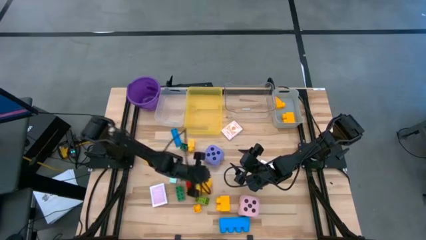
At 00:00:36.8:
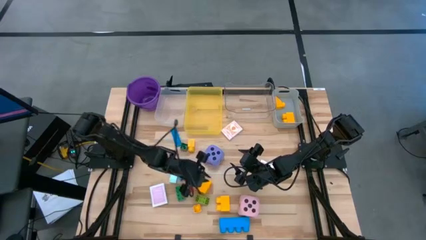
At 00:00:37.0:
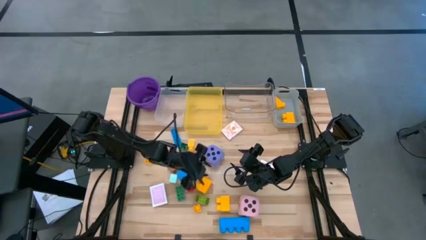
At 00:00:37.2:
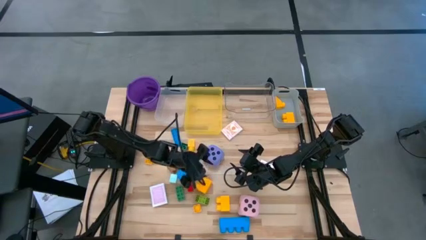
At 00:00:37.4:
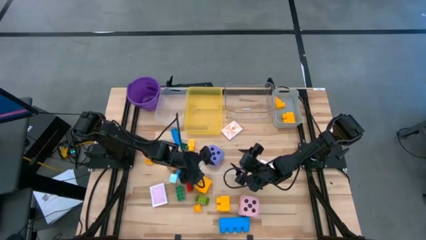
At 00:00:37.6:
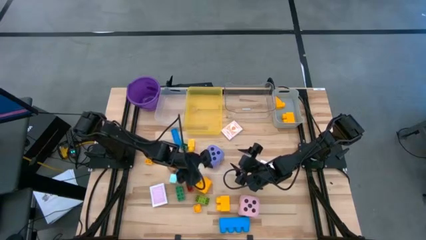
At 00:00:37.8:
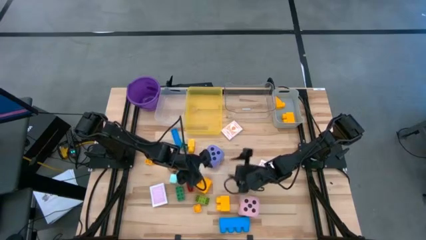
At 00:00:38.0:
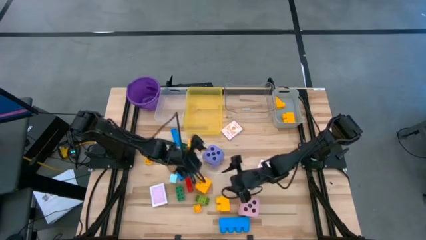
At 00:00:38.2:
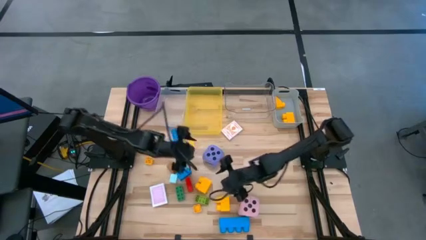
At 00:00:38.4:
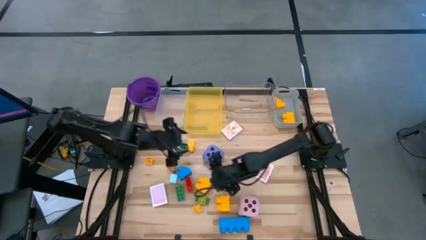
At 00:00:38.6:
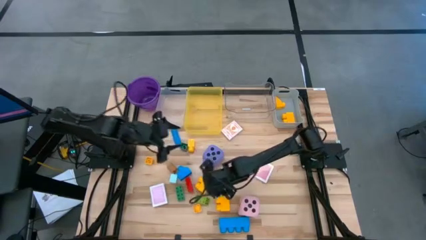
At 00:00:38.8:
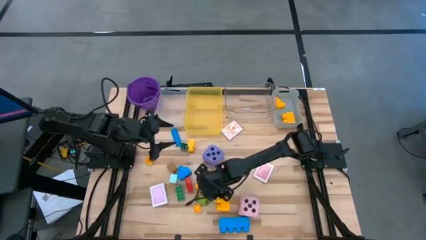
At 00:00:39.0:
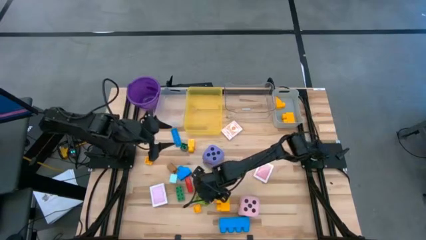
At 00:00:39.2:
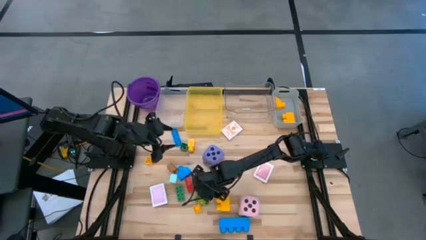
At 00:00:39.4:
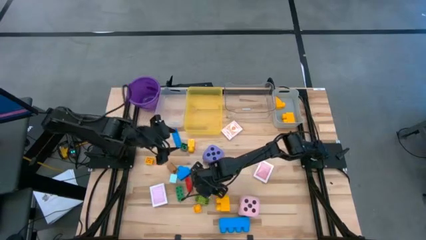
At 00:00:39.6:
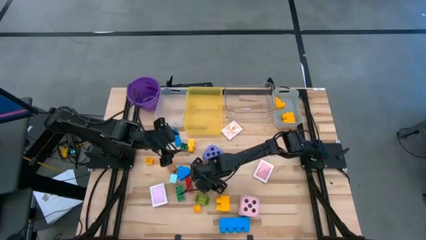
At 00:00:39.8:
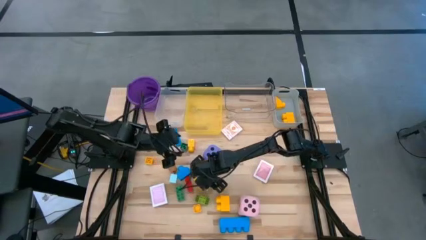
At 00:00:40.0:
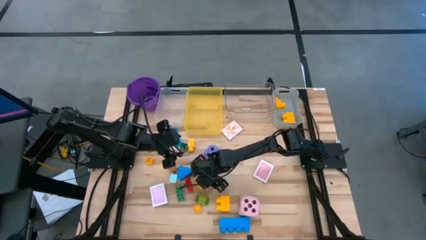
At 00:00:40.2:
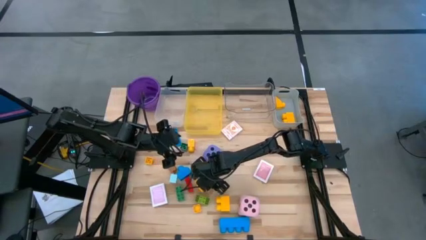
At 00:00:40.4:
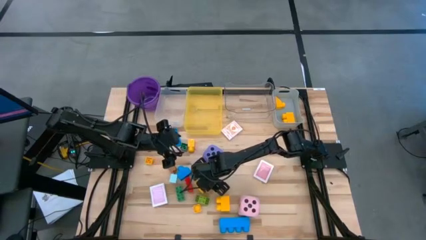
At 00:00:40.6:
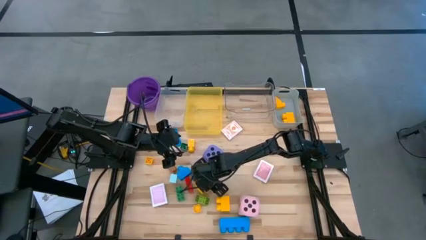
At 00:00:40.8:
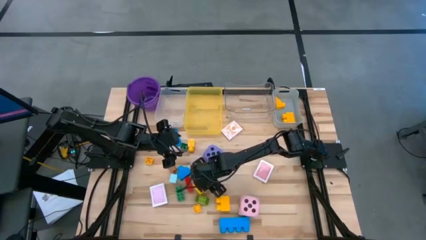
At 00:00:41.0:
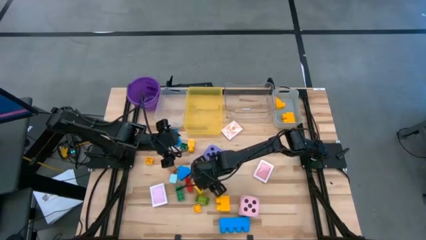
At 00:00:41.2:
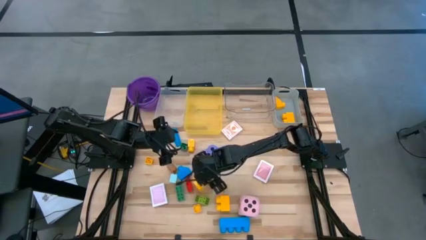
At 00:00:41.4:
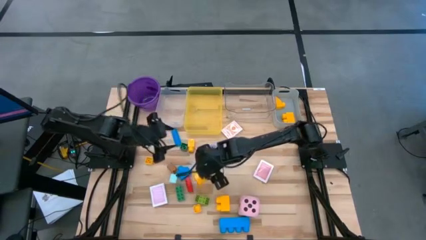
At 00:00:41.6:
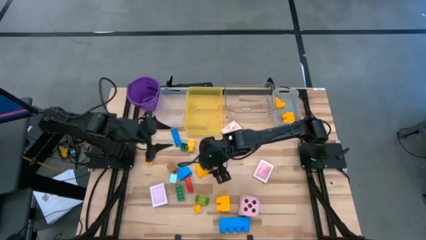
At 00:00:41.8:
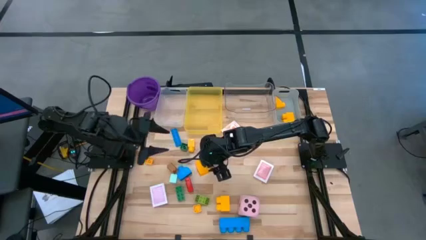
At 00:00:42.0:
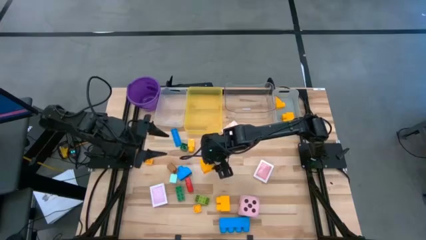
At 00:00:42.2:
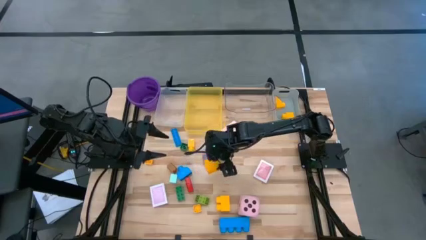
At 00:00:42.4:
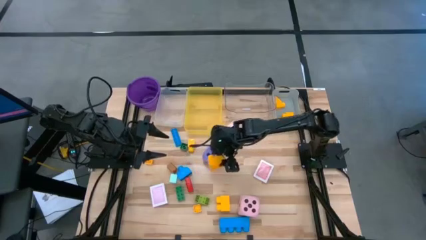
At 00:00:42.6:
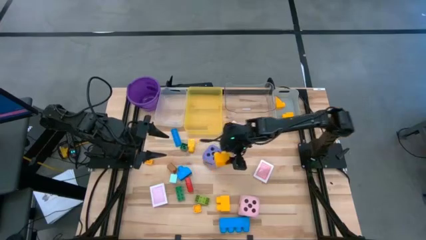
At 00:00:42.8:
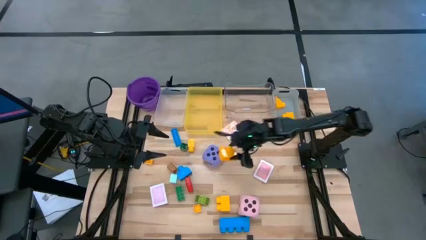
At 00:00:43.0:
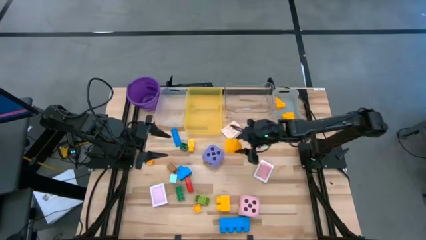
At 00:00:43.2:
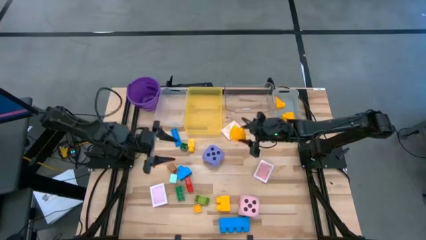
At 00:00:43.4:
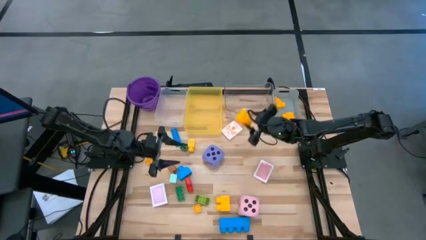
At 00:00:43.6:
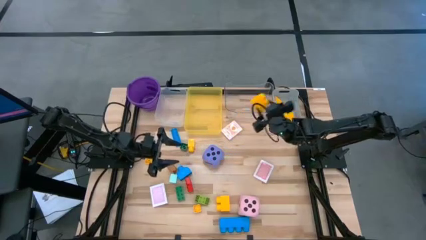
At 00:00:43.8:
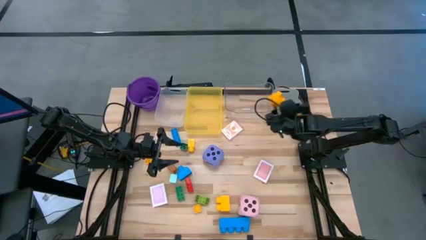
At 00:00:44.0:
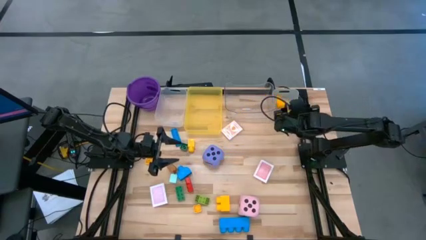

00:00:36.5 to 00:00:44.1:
Task: Pick & Place Toys
Put the large yellow game piece into the gray bin

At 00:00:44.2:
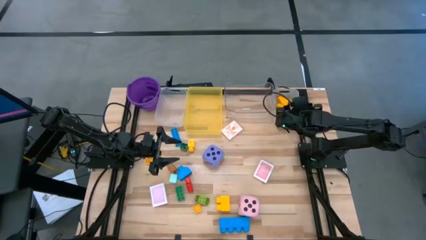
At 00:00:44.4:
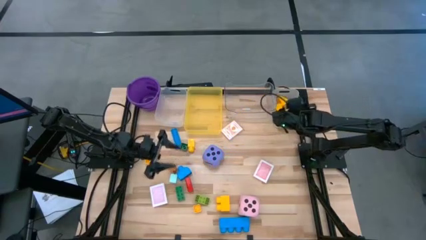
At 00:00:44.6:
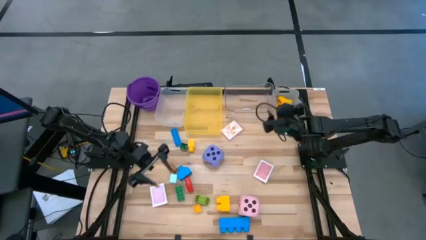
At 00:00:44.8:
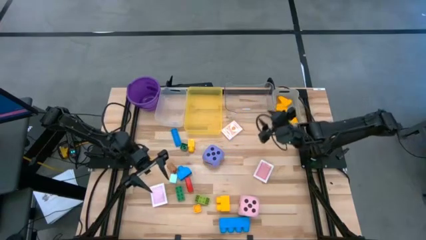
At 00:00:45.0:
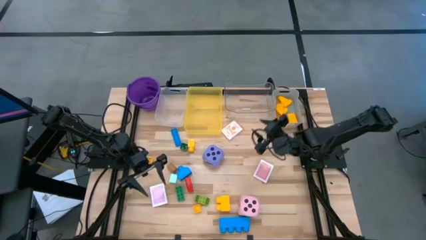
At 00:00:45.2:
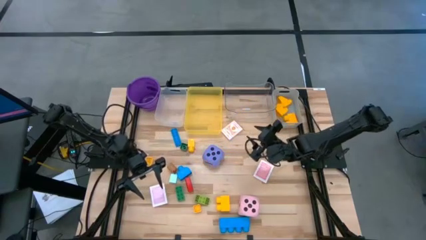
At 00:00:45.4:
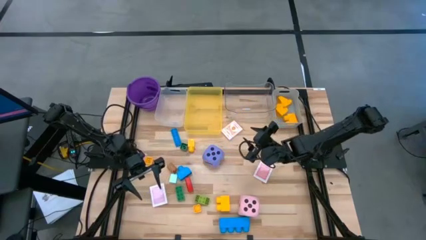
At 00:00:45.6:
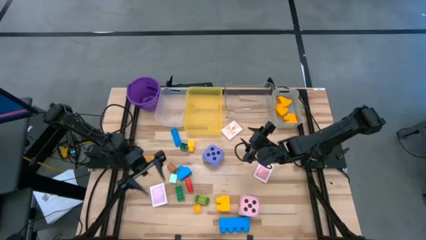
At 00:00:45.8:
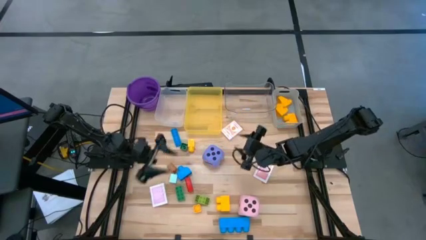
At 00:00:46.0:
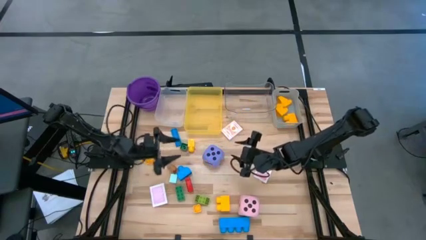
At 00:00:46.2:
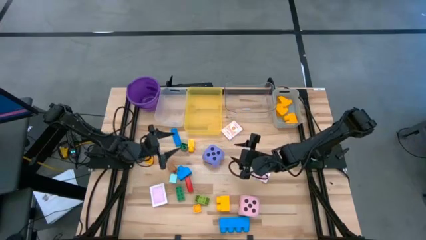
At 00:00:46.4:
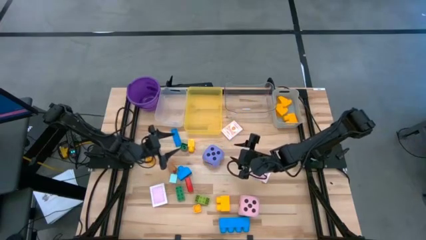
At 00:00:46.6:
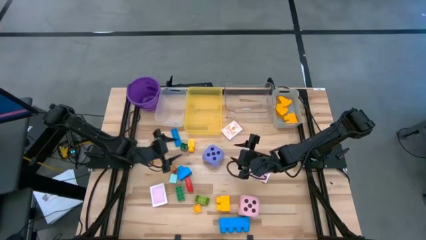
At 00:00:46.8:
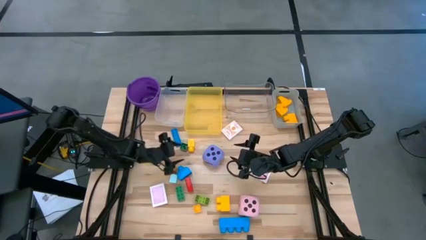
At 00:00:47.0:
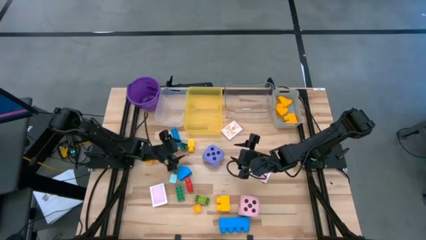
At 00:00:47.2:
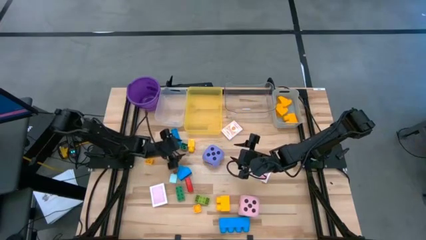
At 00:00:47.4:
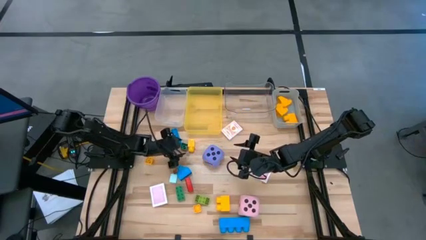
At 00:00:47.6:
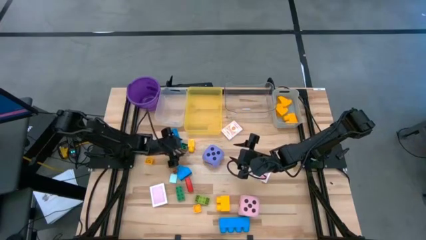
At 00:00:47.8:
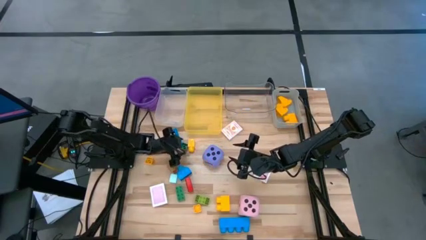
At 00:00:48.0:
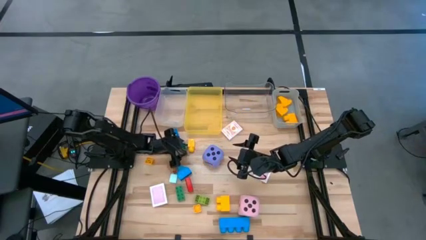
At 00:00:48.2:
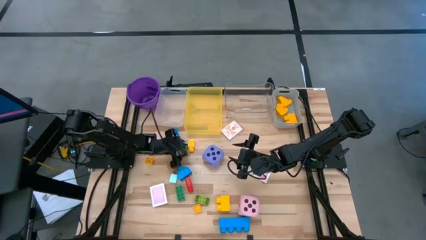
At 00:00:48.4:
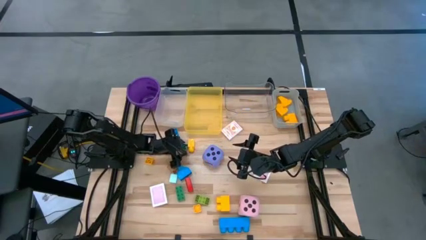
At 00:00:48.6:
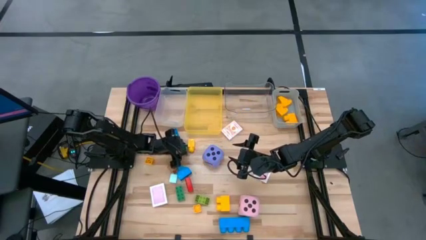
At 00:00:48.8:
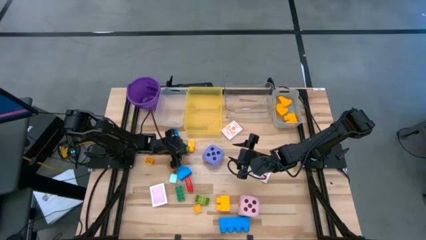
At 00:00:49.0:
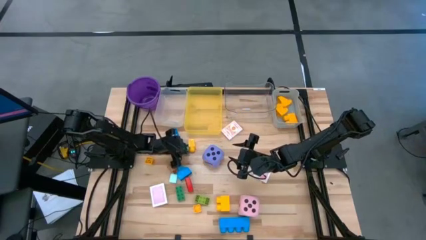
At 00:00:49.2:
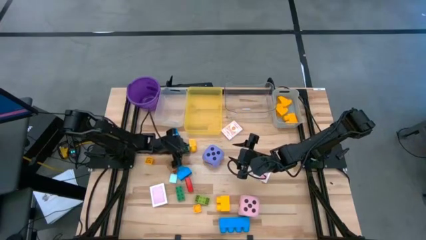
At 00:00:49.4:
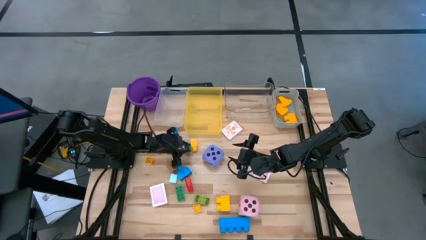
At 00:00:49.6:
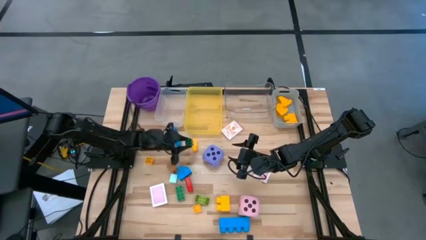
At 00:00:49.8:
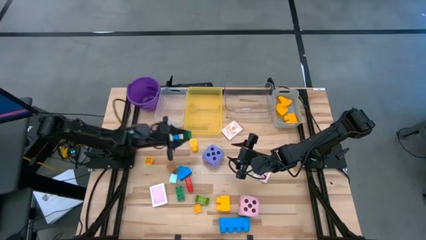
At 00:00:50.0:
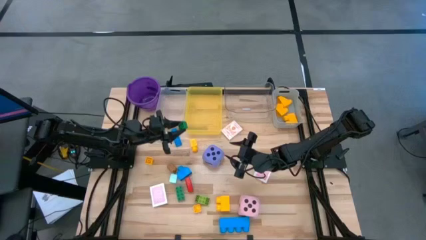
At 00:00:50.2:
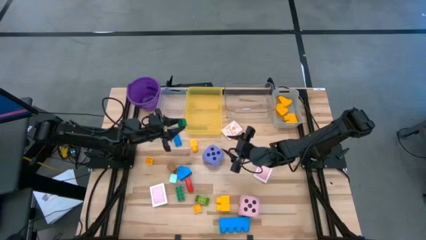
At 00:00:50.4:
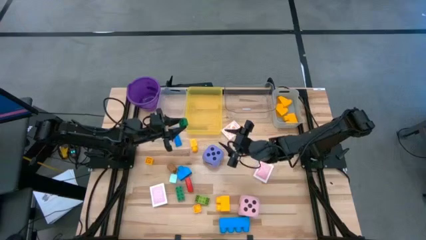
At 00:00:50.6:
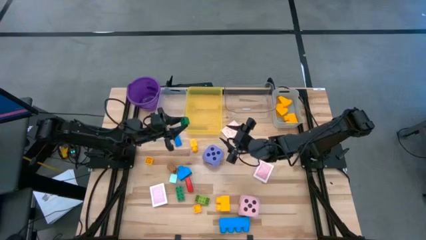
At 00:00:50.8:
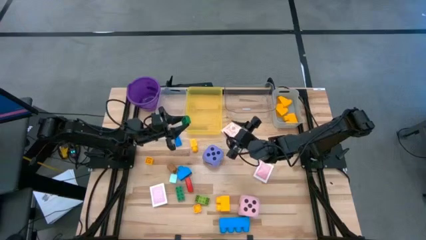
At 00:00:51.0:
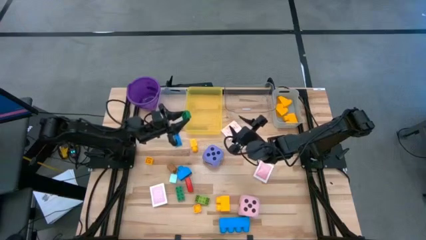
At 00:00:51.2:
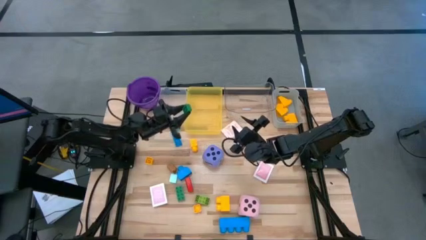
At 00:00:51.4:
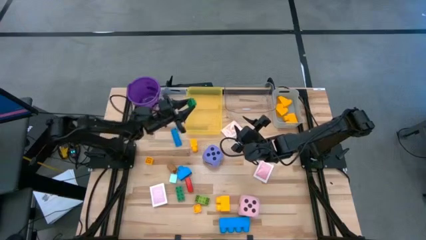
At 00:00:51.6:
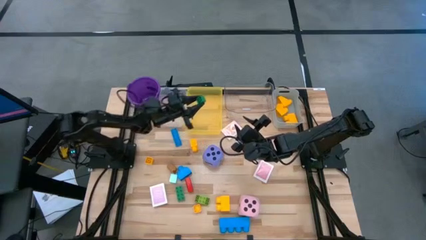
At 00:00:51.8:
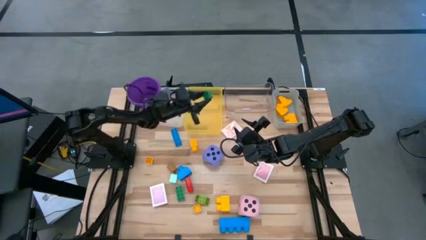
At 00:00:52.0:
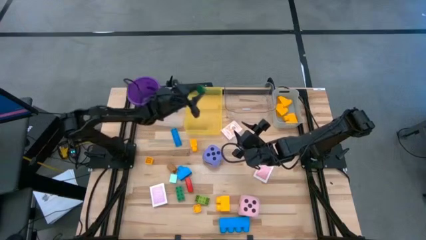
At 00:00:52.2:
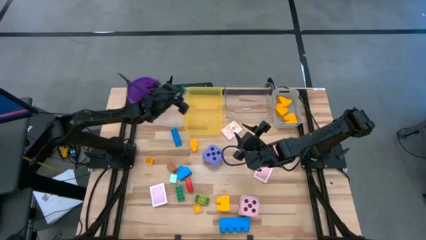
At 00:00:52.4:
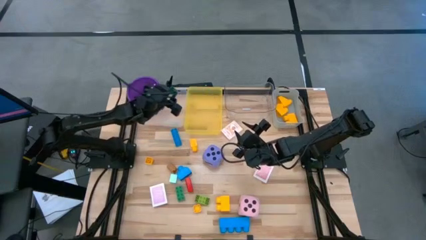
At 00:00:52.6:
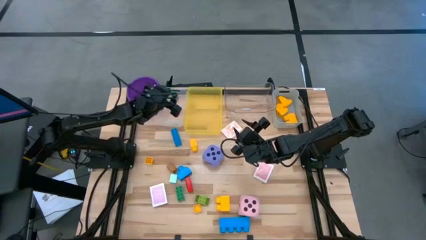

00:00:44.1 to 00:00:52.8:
Put the small green game piece into the white bin
